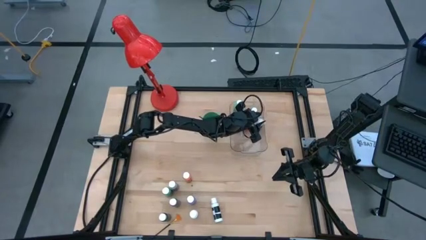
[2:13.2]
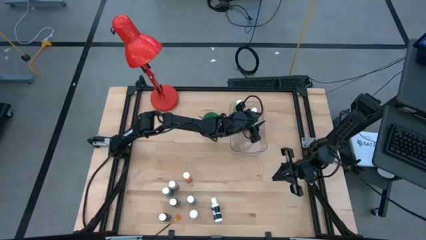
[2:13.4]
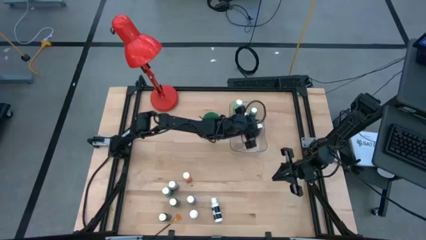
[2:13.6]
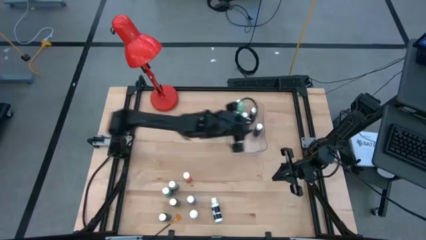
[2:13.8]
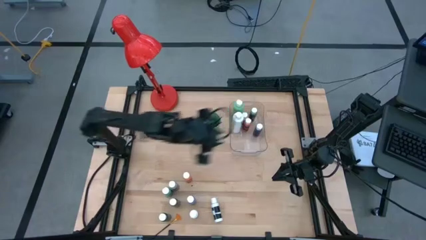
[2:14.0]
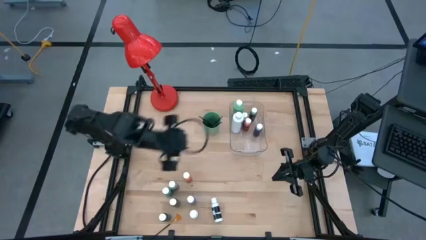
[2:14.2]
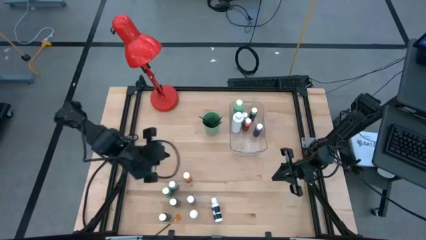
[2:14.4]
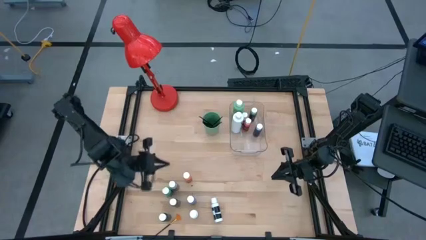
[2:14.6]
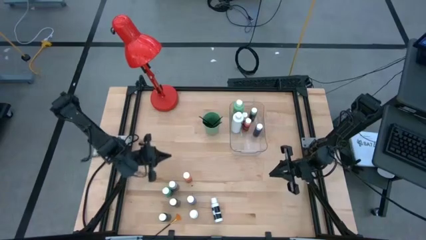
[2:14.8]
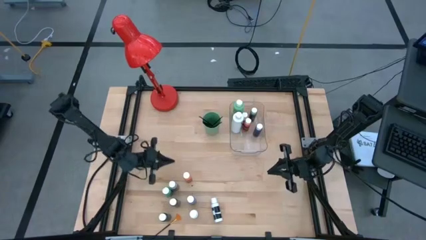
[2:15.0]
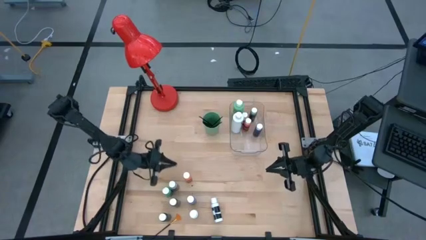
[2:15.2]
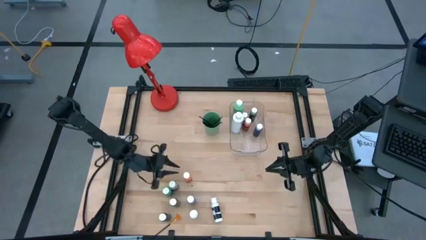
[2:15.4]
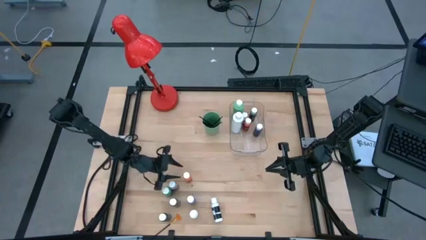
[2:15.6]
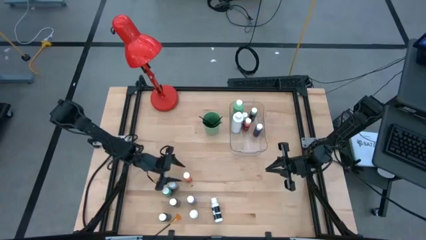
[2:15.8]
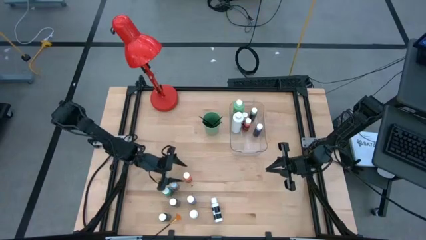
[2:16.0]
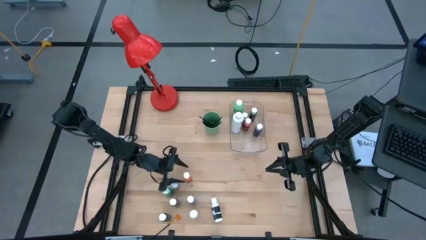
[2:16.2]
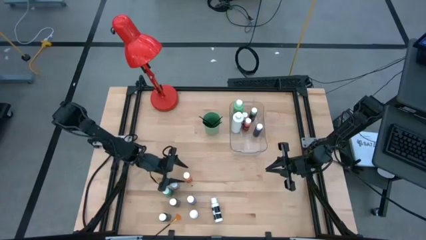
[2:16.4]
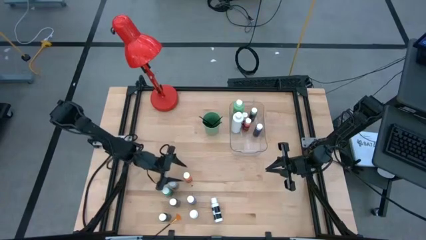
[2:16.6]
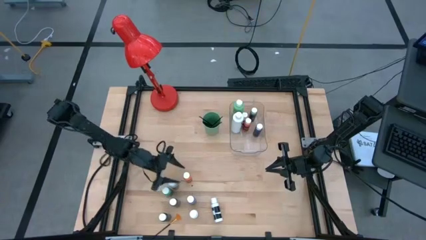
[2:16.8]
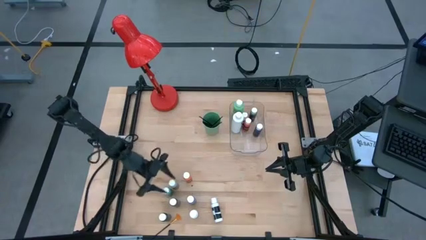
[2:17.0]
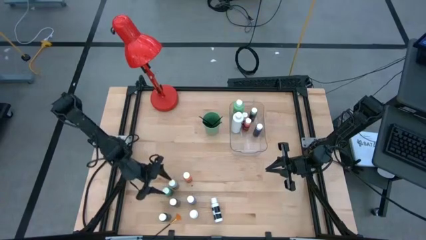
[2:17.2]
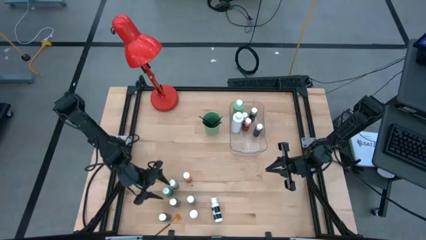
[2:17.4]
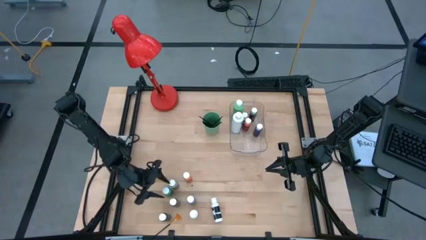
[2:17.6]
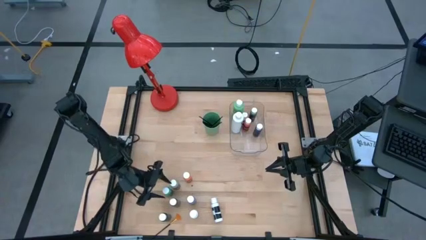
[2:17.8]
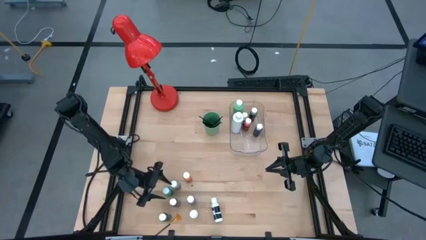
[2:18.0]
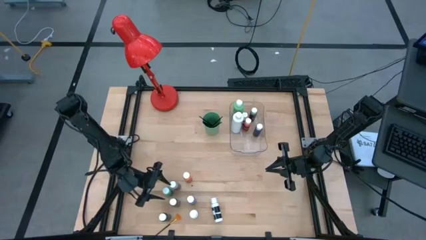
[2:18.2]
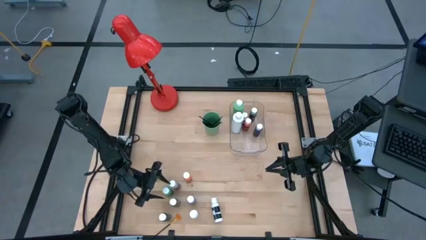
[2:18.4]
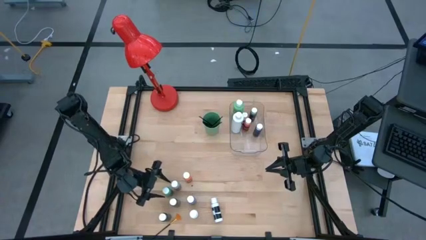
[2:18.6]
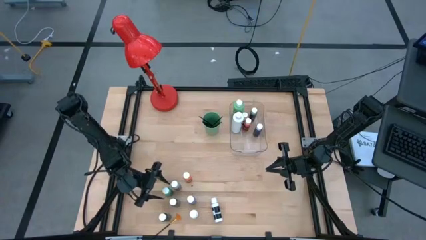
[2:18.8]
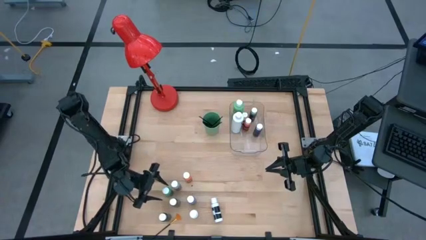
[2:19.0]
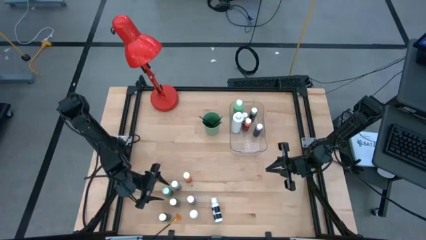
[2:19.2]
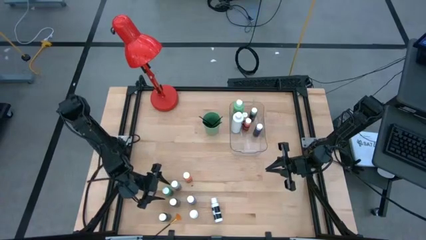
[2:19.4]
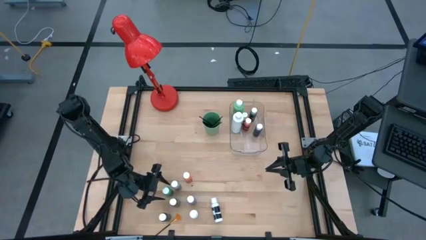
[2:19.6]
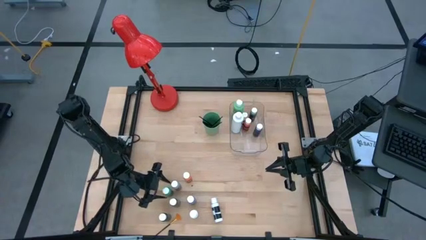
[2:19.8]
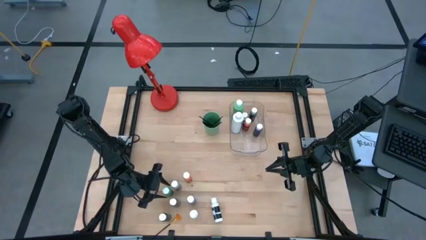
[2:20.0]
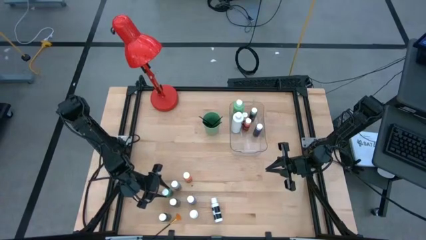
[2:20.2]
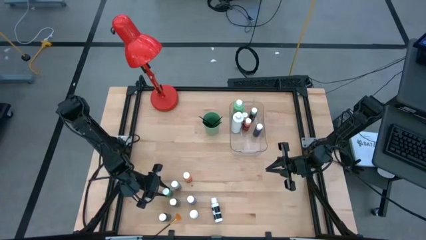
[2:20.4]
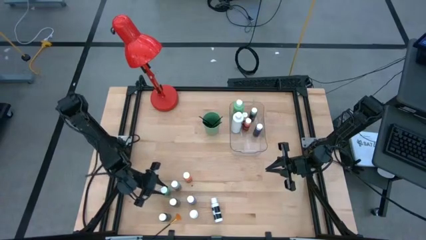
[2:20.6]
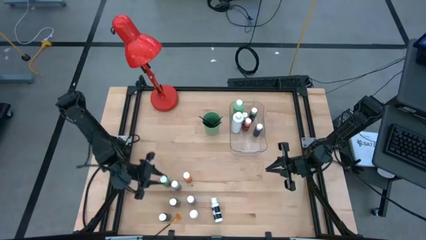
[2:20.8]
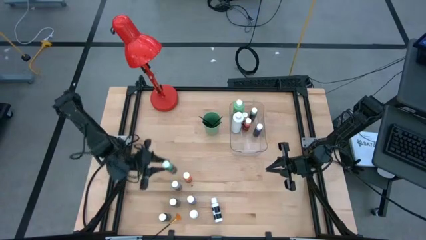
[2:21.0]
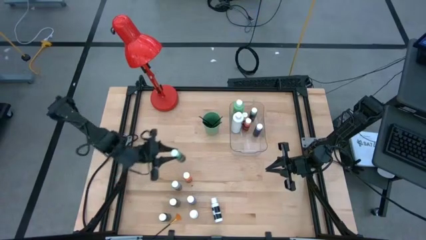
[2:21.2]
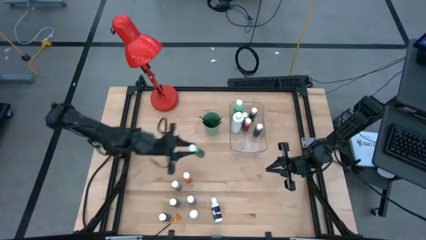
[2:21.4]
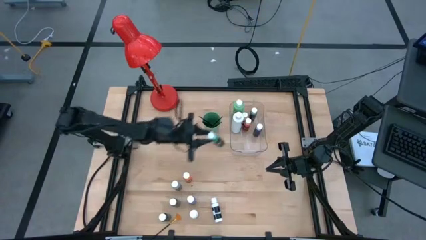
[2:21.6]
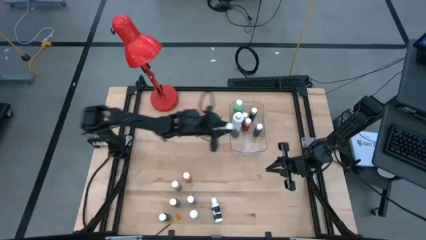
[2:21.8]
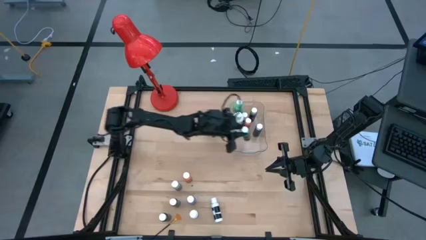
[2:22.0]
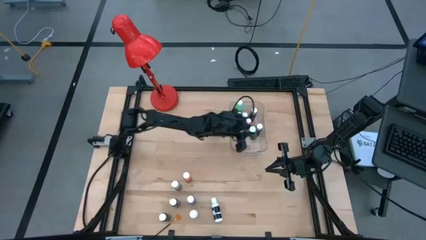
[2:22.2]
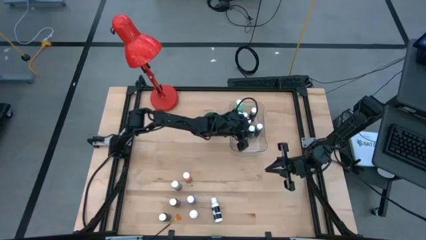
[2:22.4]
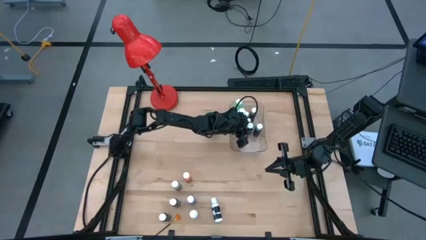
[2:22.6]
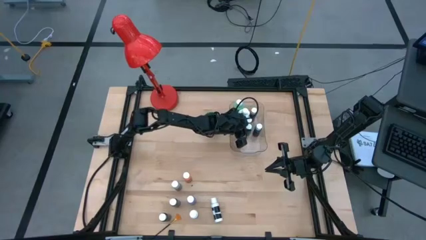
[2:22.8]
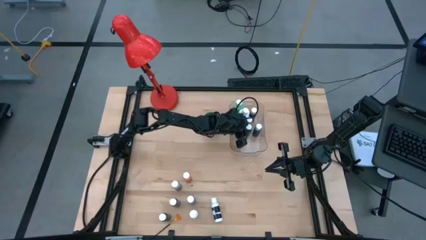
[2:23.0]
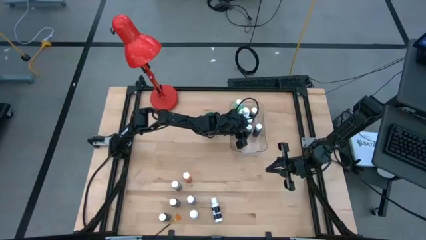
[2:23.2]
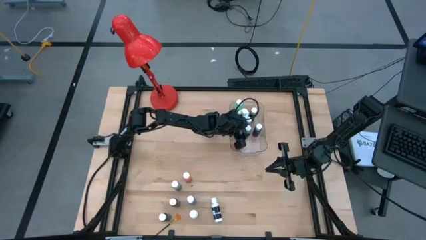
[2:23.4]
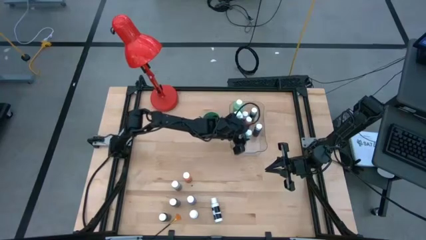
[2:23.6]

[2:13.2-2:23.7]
Task: Pick & Place Paint Supplies
Put the green paint bottle into the transparent bin

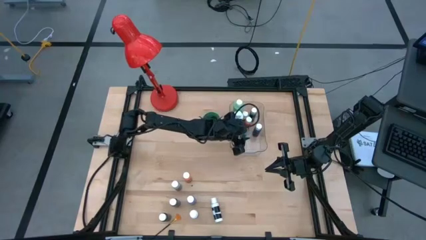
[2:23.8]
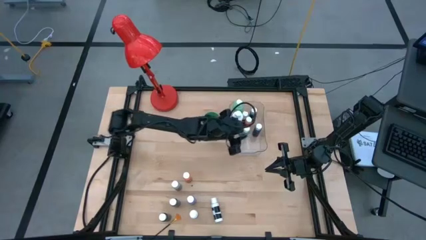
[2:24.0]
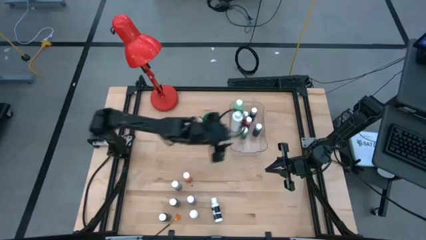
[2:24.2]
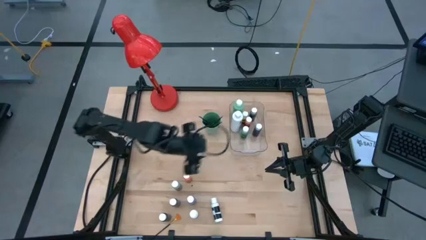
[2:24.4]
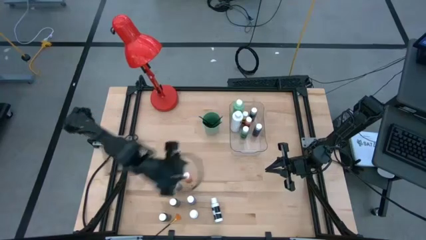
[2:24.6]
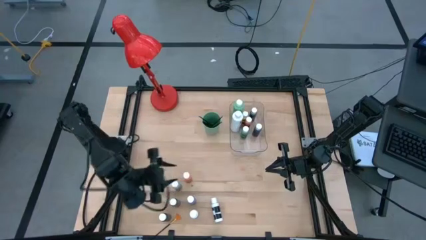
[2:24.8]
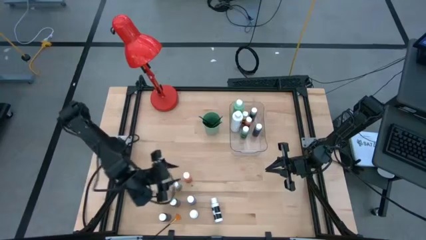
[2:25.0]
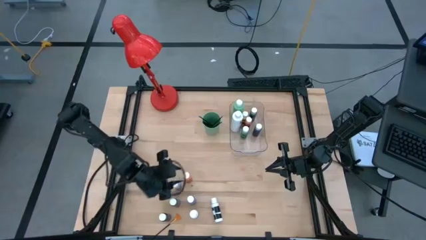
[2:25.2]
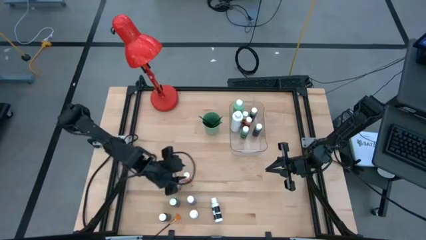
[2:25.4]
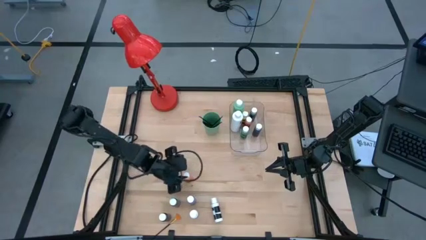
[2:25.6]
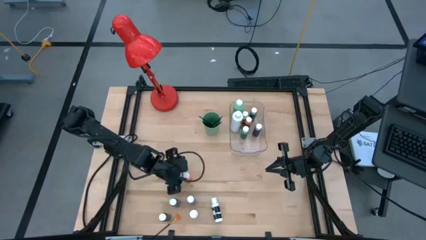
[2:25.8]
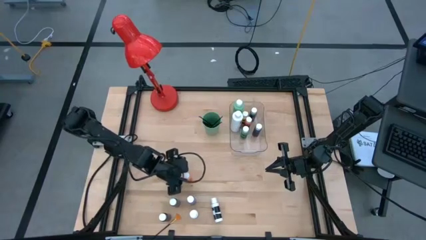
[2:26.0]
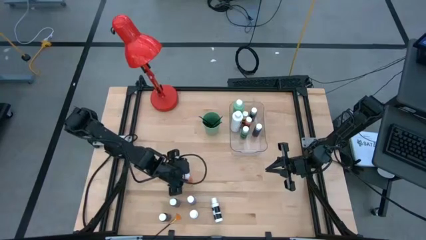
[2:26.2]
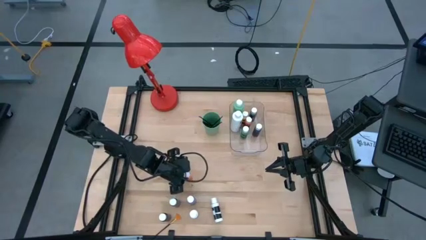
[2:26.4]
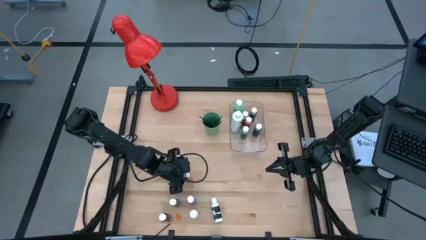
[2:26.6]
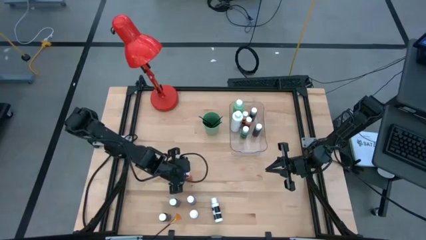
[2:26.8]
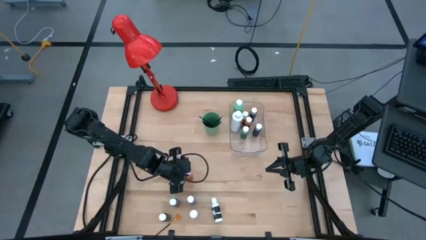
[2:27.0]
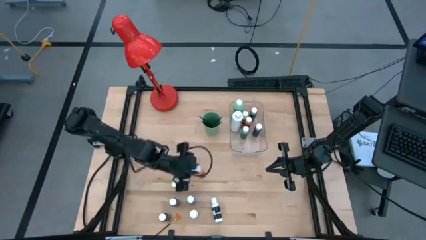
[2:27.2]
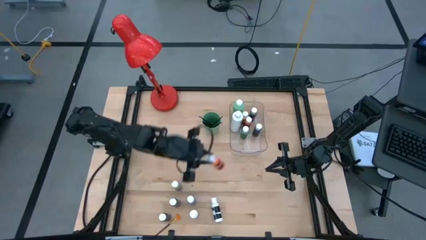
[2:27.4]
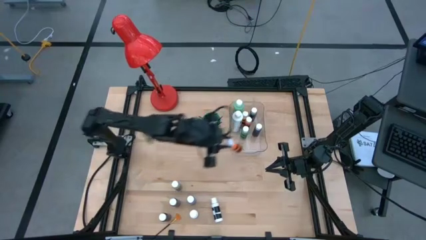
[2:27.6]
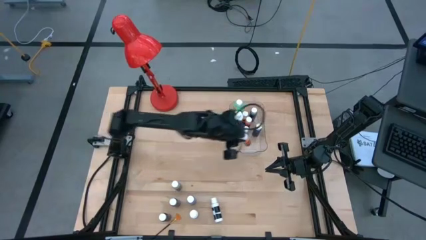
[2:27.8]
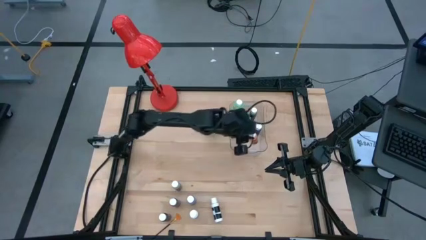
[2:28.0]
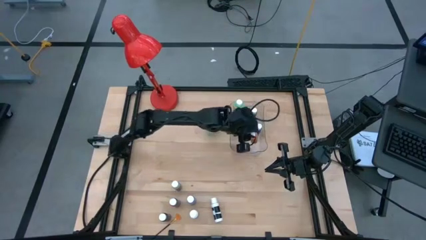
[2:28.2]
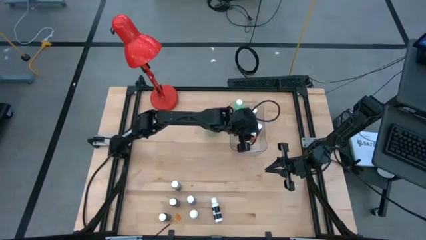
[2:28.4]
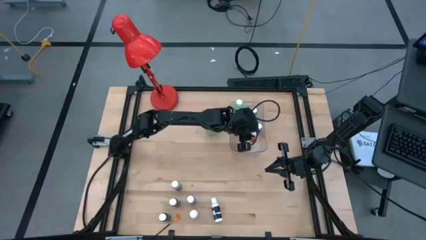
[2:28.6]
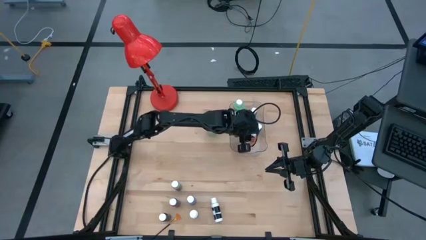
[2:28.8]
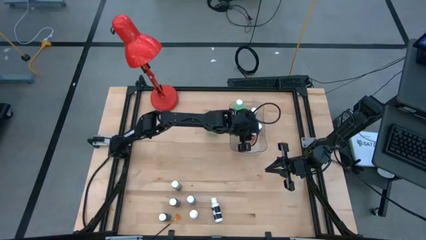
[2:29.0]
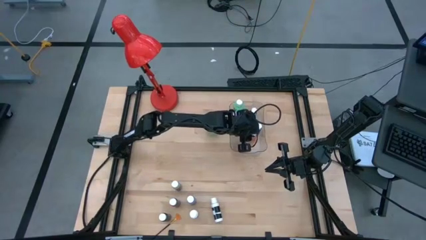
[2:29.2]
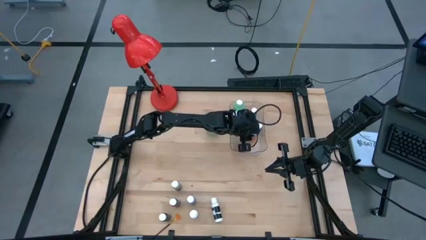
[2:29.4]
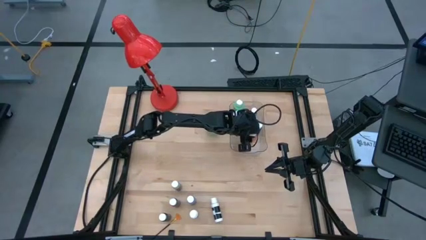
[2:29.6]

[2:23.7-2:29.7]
Put the orange paint bottle into the transparent bin
